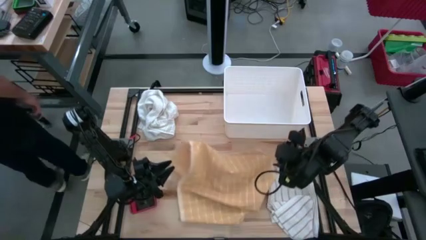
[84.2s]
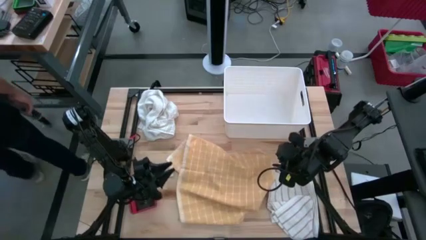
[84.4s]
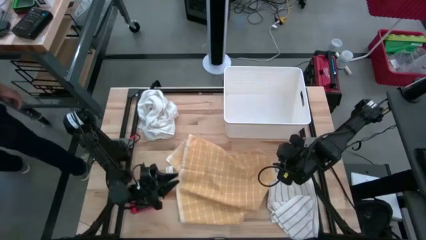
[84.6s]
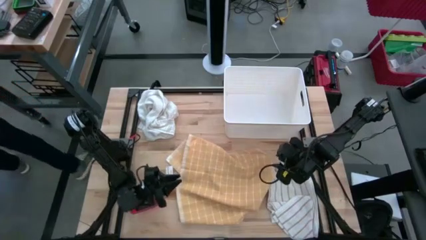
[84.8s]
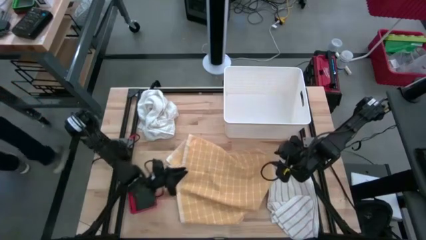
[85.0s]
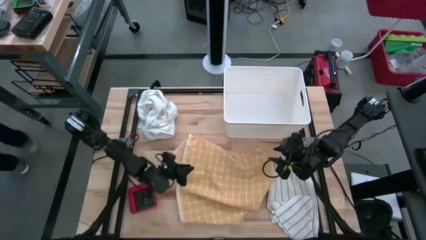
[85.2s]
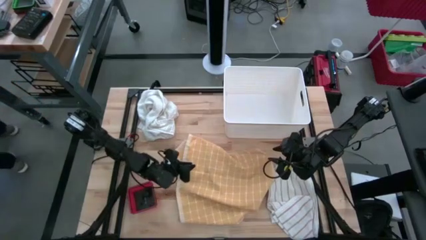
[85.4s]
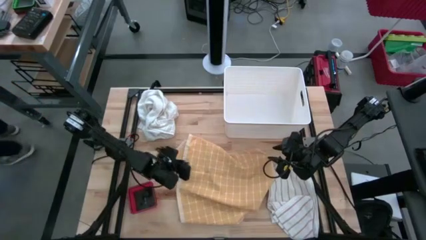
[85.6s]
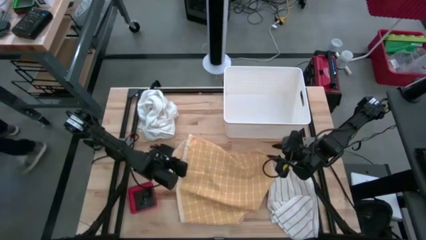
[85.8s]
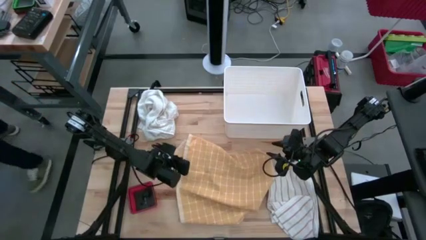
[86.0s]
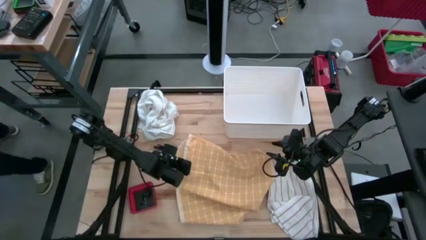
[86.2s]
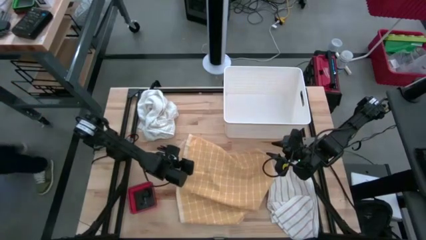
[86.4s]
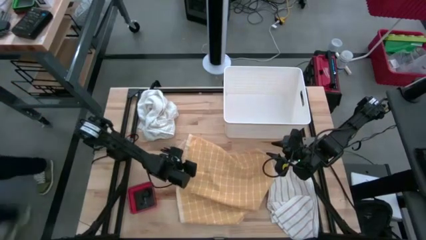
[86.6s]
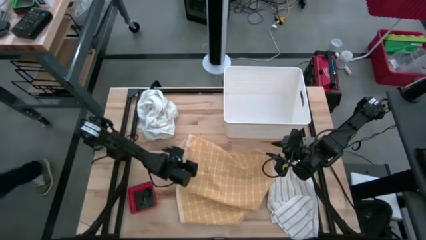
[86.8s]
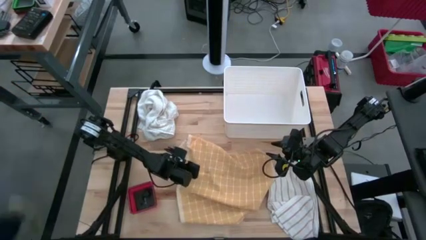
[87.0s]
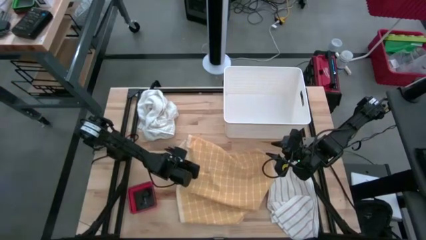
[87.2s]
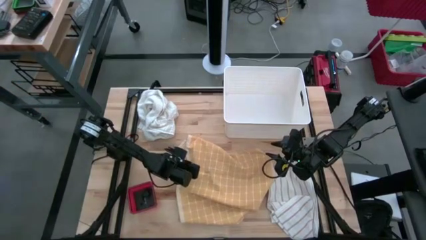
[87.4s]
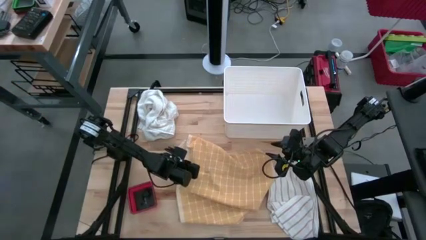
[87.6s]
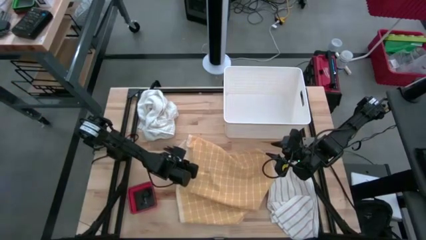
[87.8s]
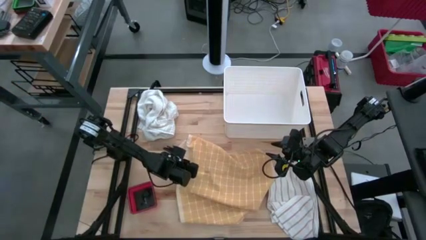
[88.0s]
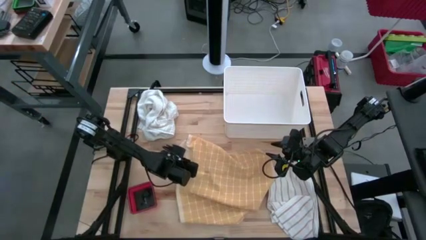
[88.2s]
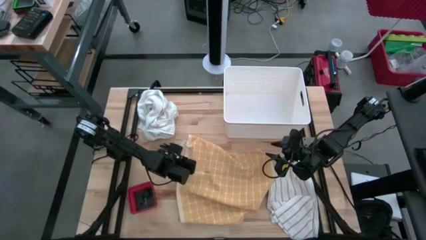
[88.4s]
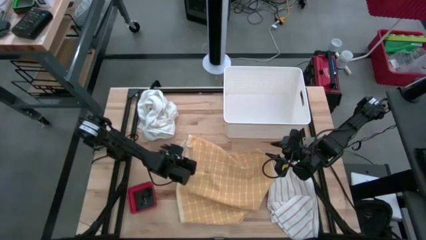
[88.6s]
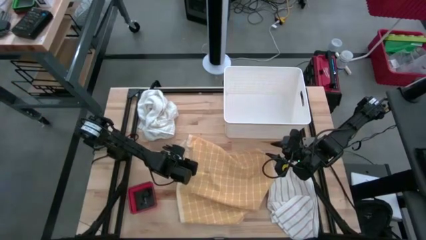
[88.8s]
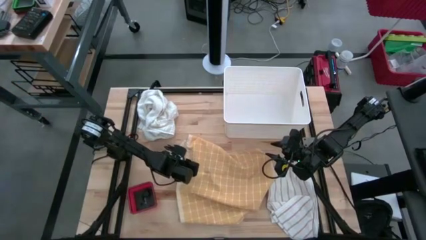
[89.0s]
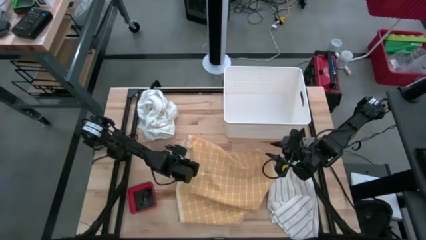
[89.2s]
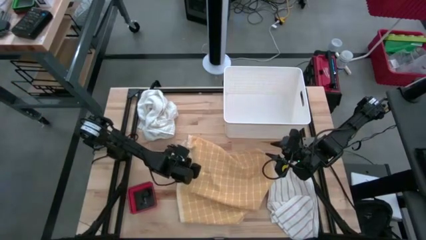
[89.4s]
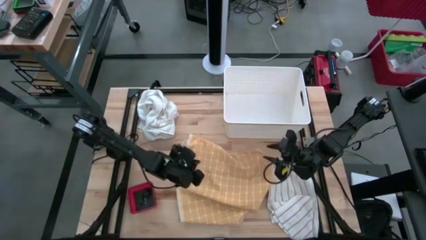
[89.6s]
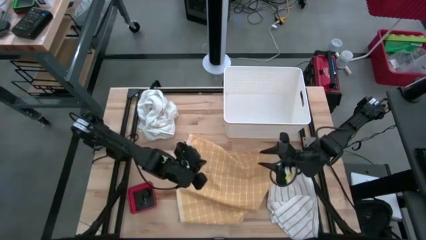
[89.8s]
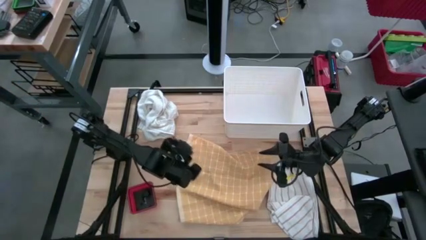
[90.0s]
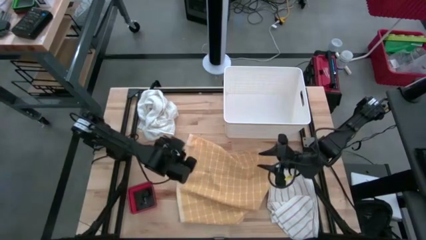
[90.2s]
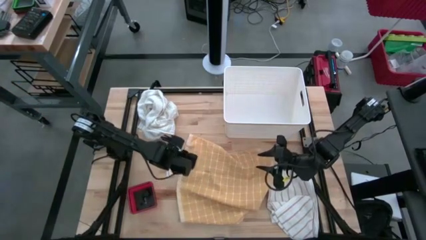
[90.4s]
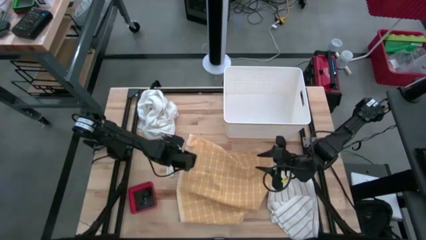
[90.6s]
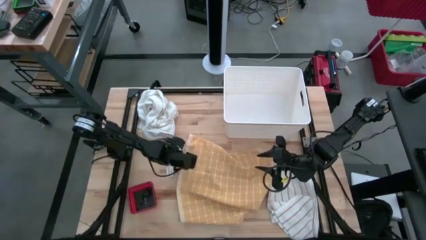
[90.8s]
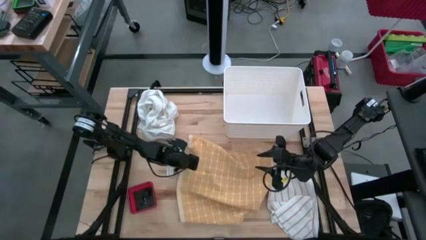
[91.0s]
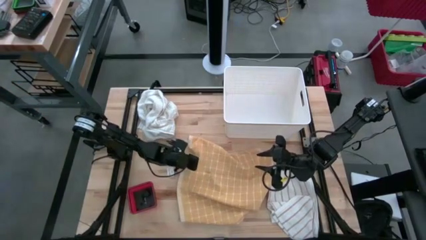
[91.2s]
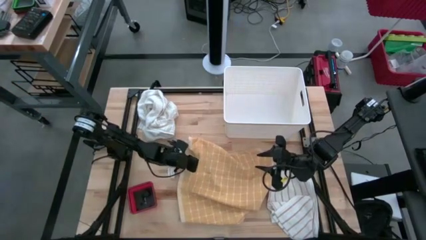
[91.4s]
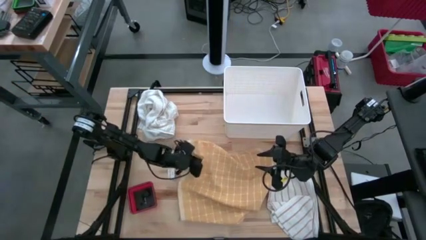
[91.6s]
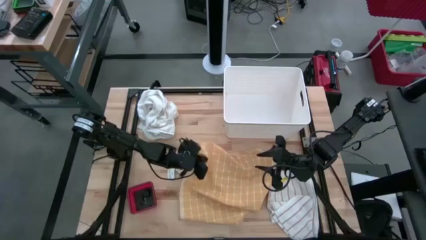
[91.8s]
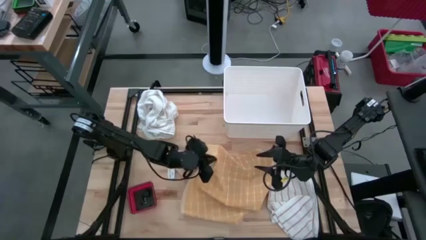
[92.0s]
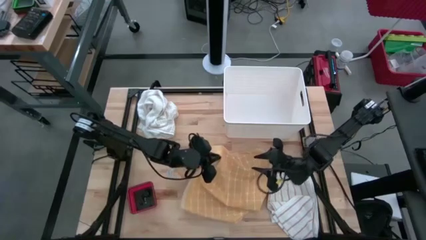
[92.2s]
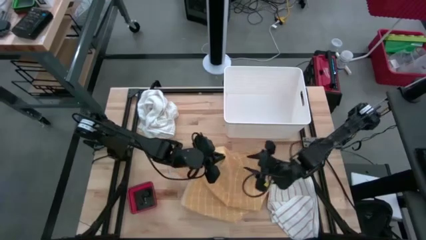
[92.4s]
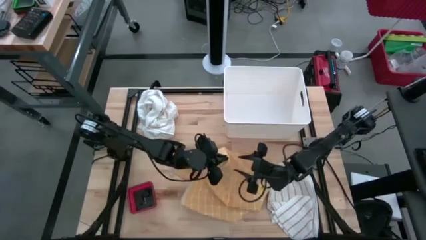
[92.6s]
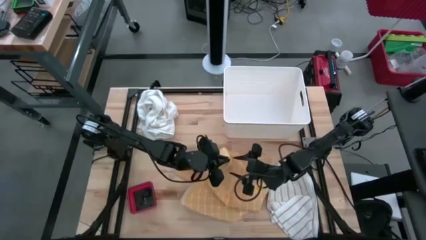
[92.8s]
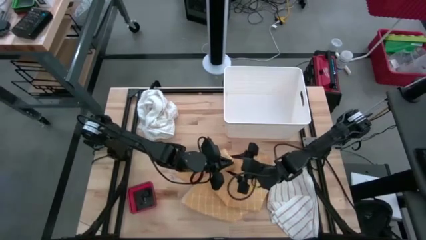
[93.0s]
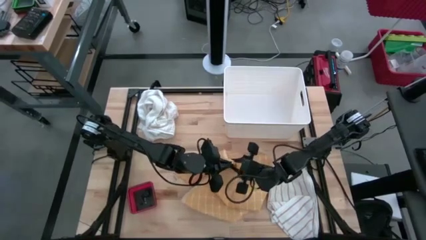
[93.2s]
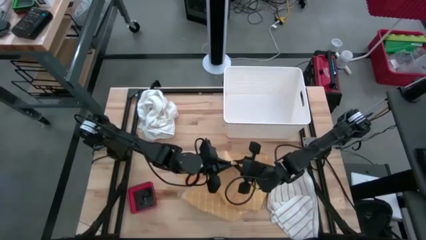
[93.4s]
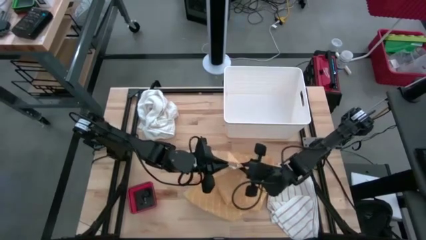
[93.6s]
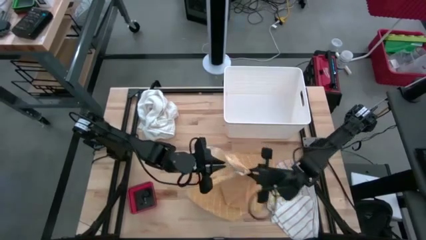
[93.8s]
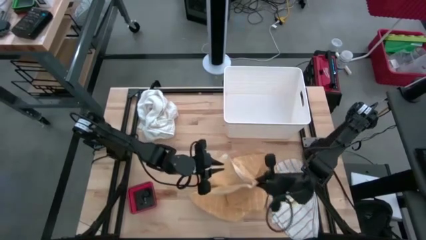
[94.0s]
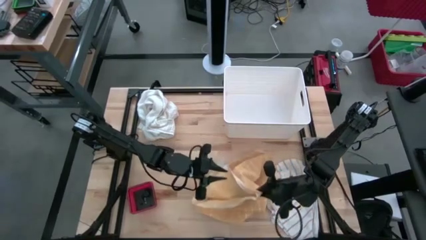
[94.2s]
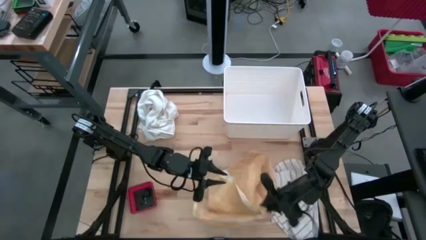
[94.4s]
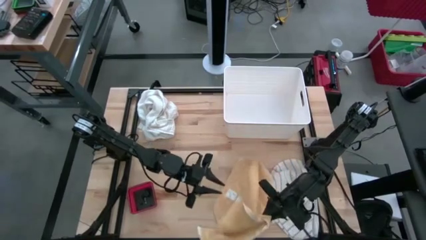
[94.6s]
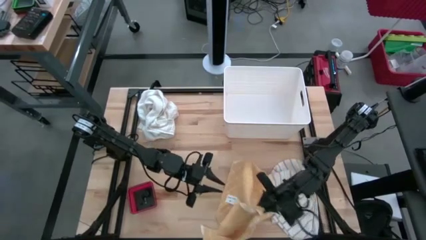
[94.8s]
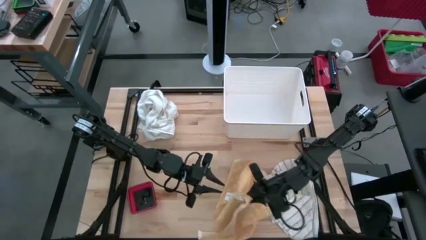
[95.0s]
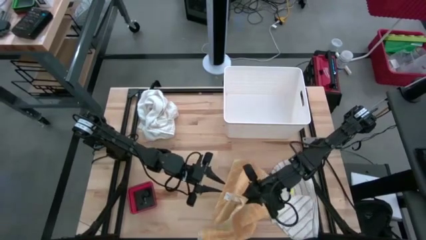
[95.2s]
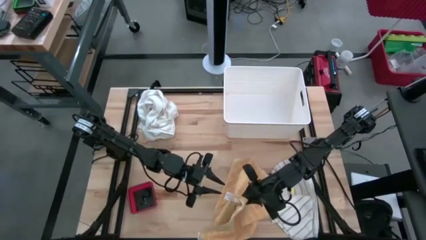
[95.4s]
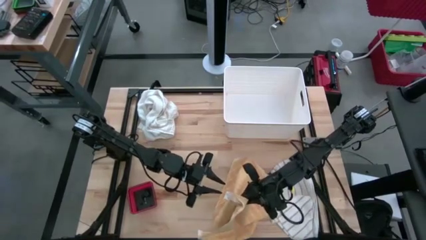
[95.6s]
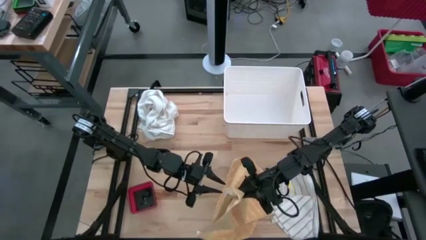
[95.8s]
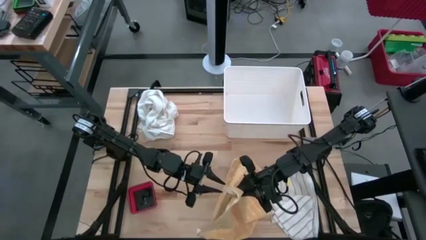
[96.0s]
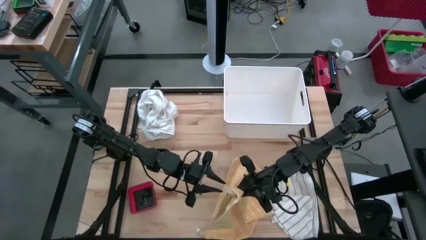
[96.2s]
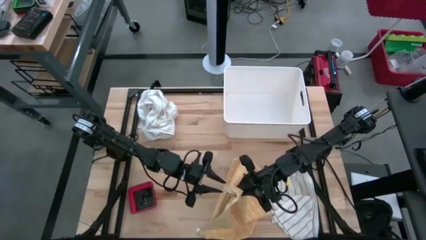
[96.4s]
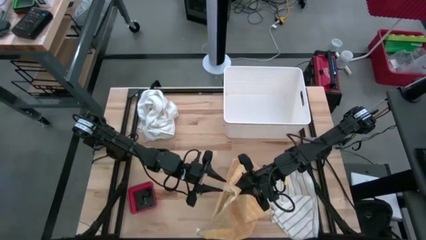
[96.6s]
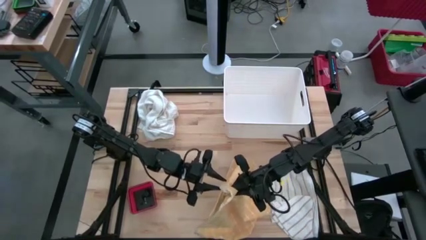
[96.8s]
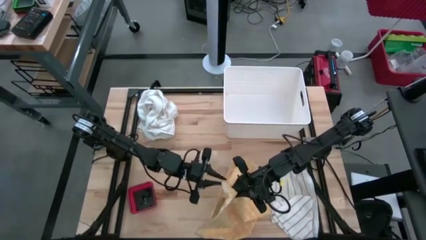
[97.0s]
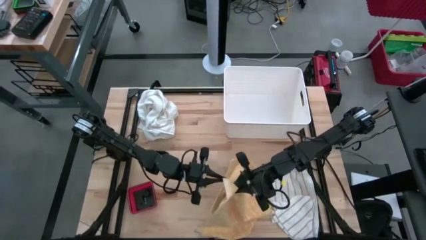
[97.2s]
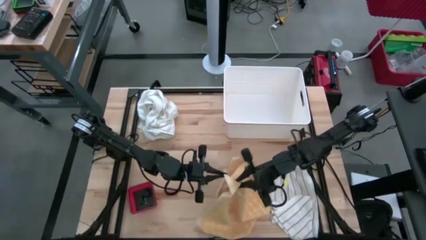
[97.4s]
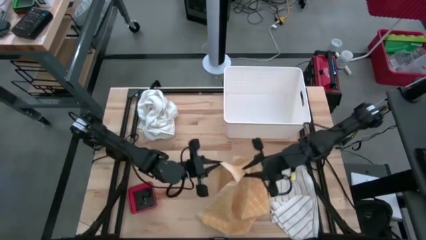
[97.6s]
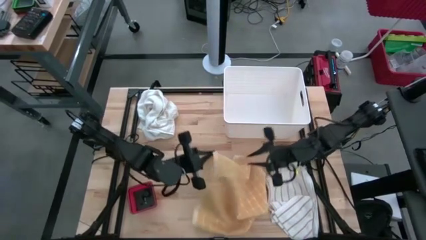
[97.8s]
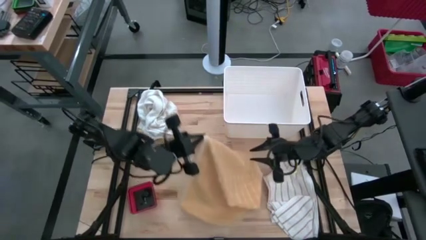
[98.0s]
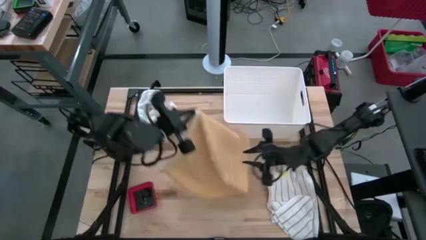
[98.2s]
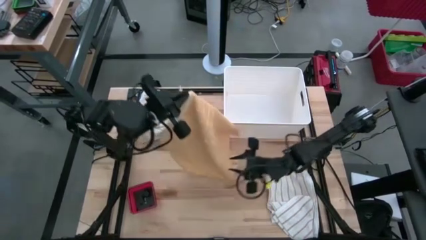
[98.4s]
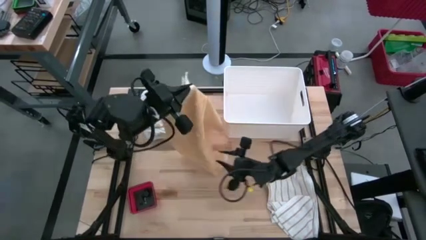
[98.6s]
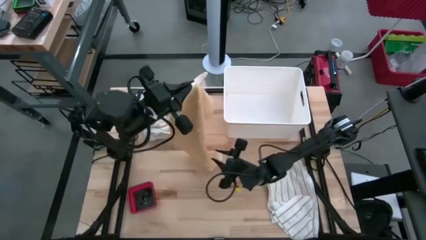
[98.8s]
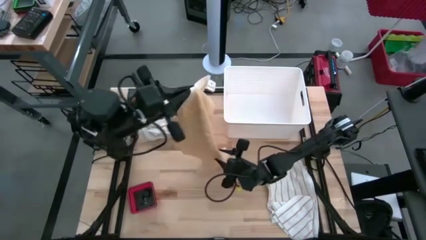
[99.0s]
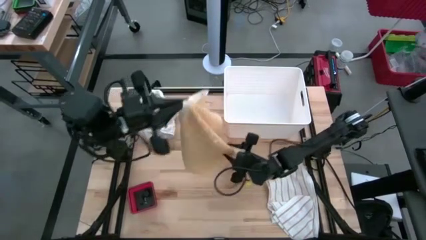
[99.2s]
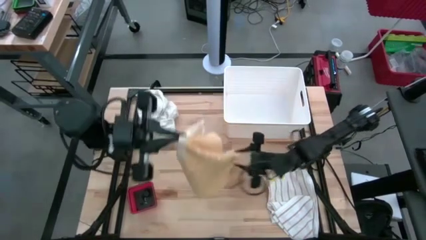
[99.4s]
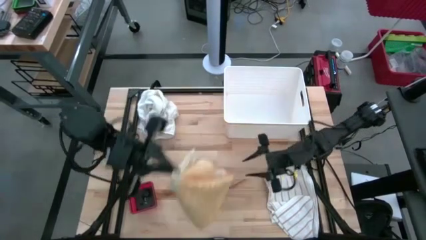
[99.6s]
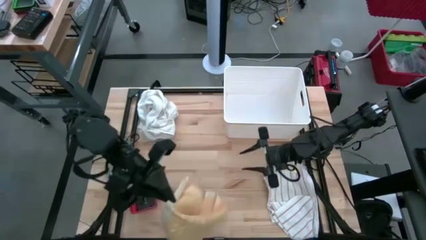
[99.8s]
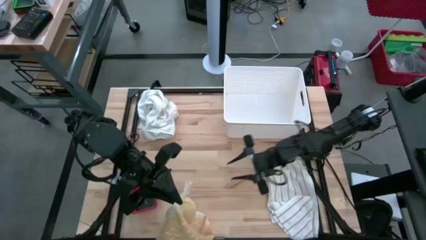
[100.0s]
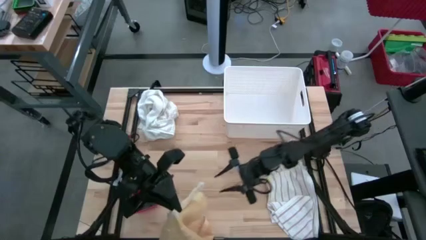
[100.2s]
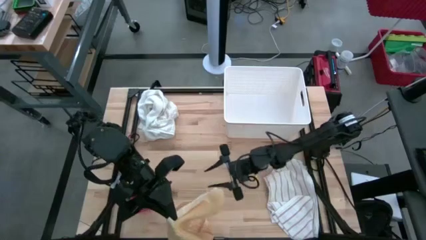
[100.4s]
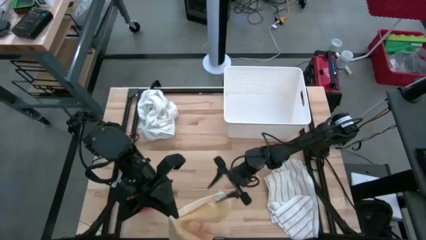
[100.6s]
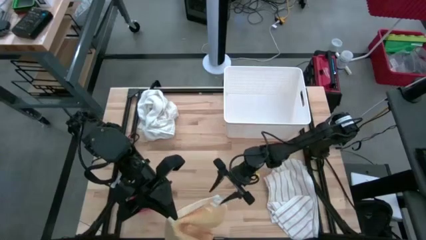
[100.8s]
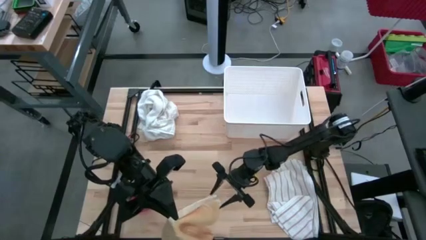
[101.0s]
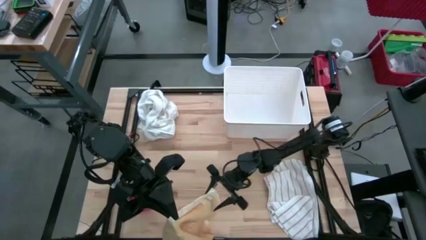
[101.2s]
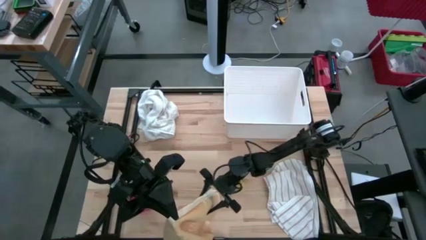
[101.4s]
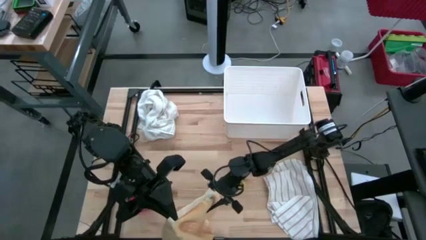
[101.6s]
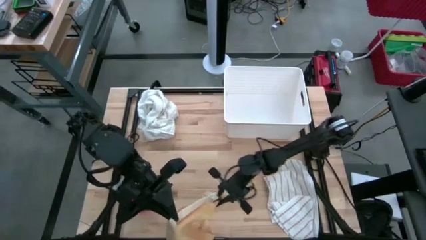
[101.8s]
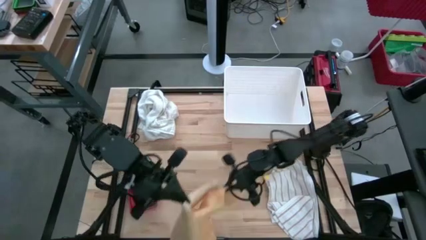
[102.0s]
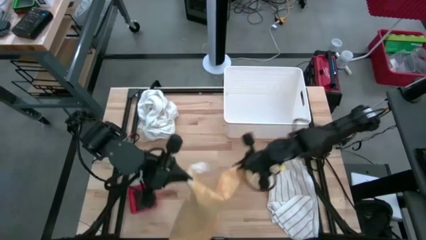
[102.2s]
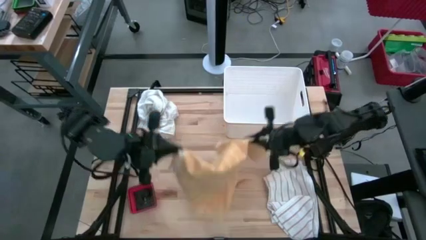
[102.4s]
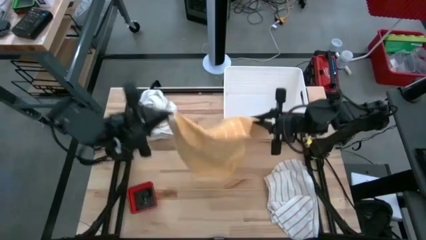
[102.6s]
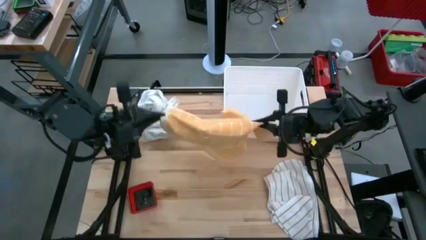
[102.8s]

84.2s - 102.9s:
Task: Fold towel
Fold the yellow kitchen towel
